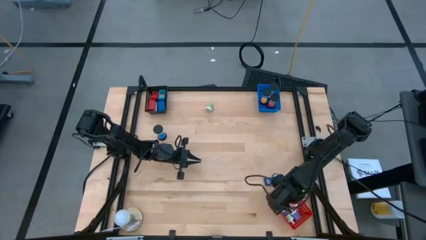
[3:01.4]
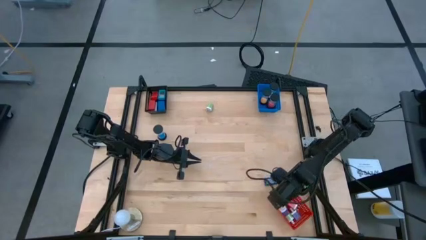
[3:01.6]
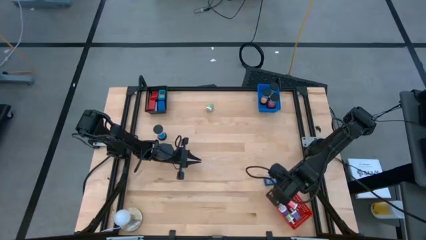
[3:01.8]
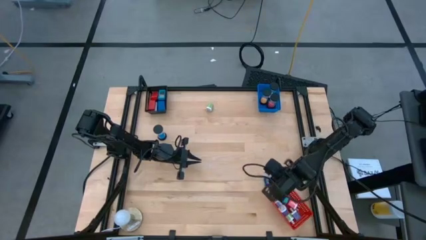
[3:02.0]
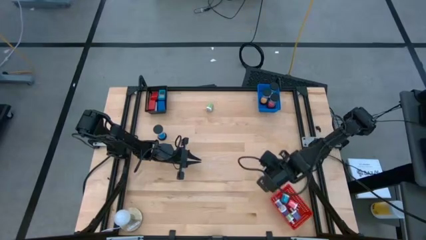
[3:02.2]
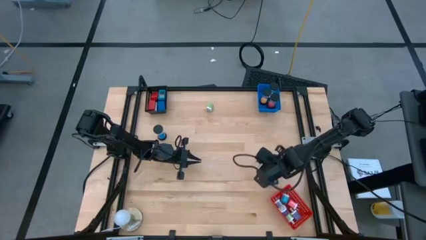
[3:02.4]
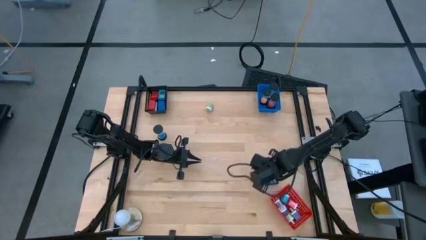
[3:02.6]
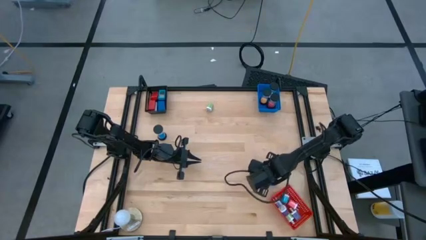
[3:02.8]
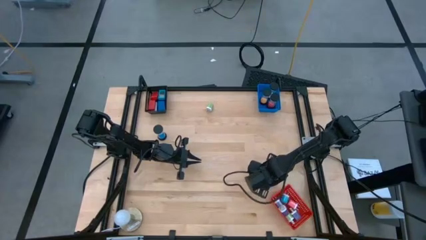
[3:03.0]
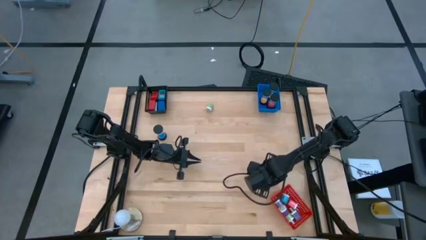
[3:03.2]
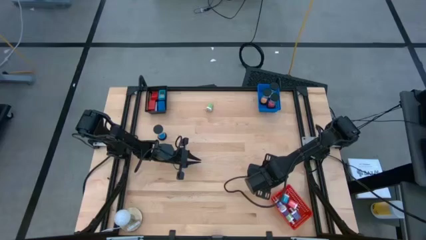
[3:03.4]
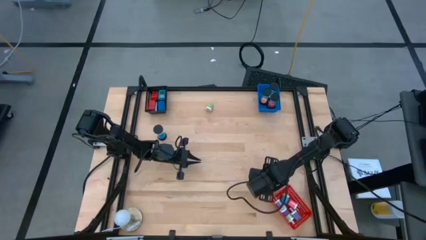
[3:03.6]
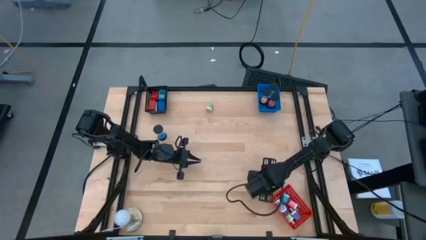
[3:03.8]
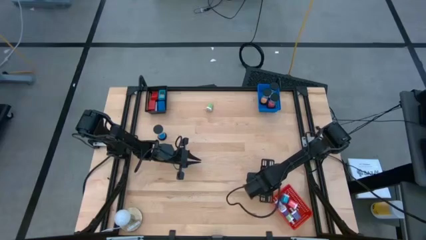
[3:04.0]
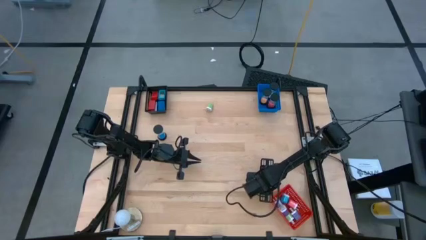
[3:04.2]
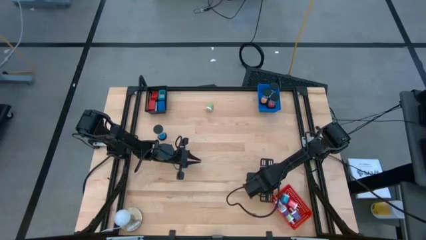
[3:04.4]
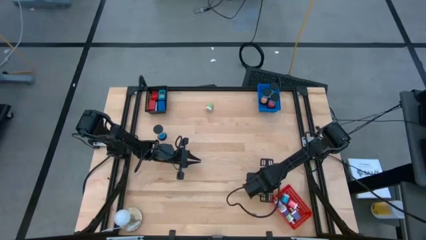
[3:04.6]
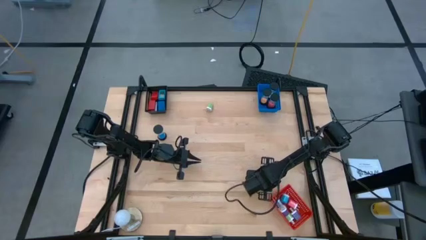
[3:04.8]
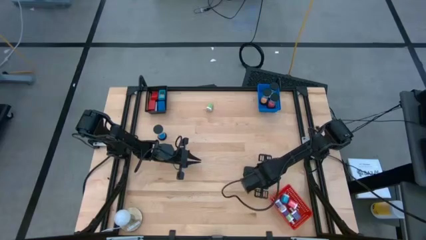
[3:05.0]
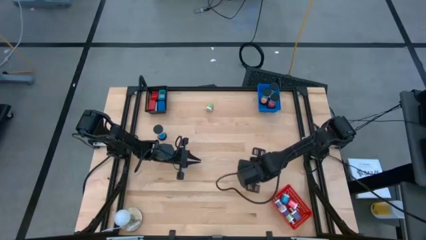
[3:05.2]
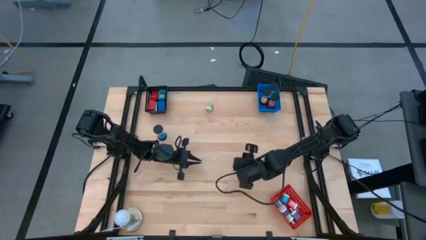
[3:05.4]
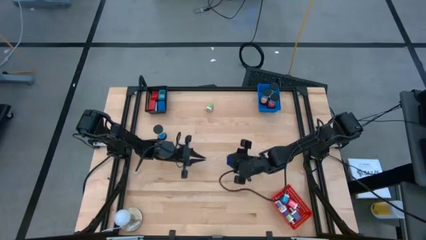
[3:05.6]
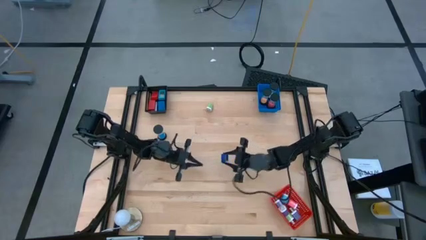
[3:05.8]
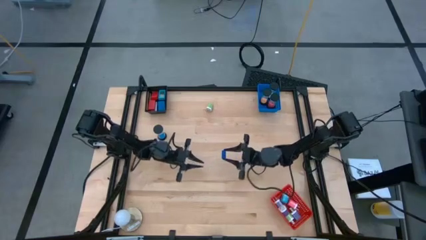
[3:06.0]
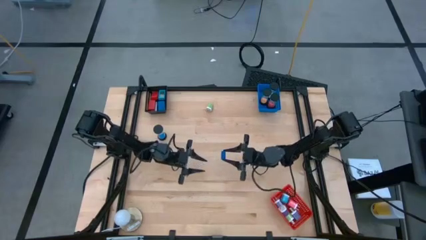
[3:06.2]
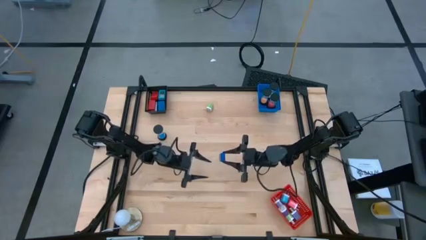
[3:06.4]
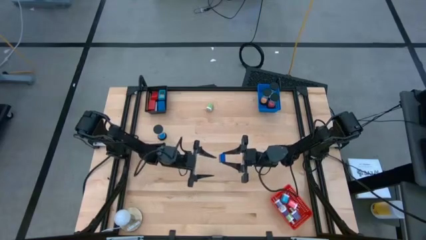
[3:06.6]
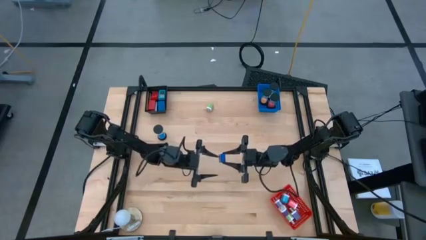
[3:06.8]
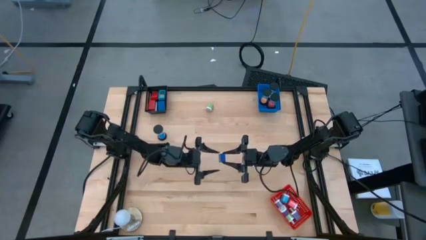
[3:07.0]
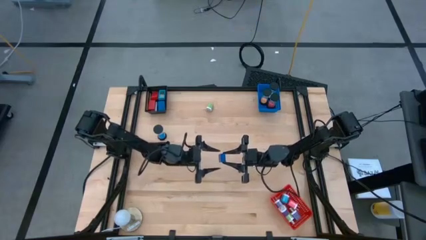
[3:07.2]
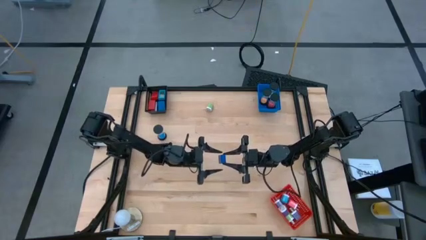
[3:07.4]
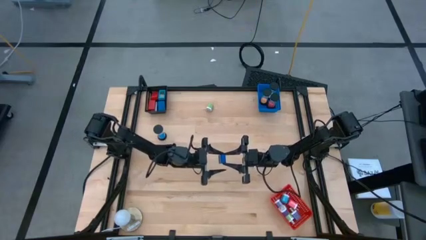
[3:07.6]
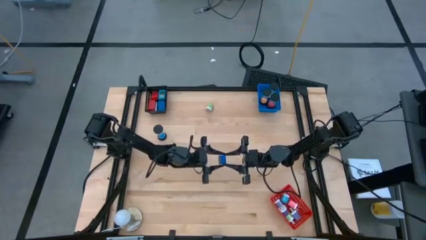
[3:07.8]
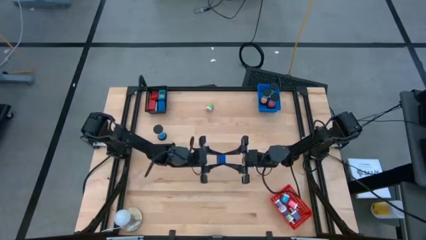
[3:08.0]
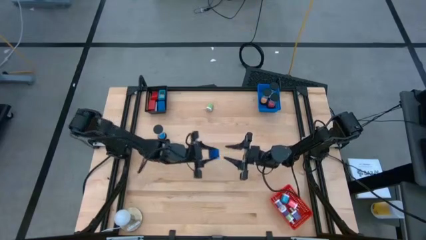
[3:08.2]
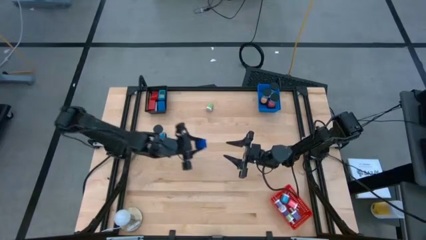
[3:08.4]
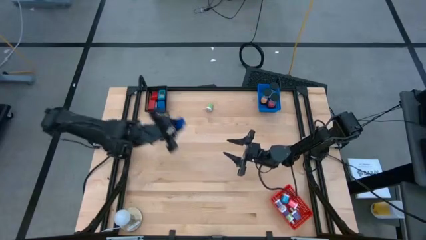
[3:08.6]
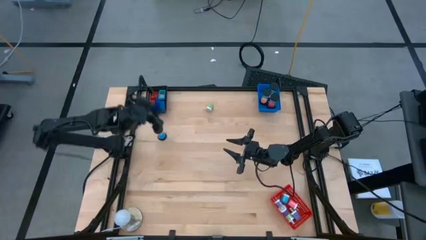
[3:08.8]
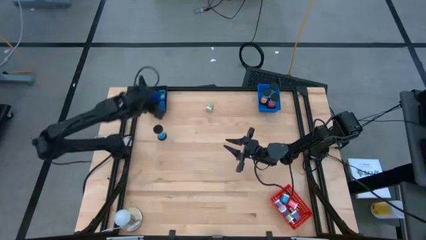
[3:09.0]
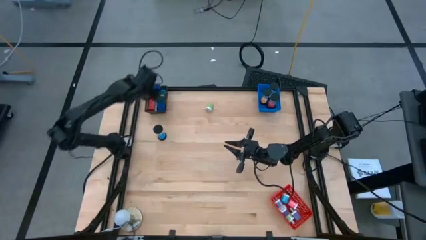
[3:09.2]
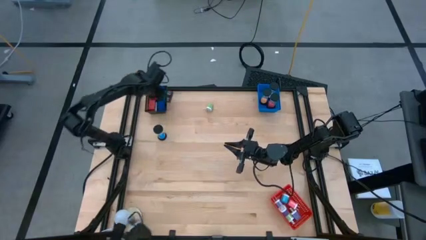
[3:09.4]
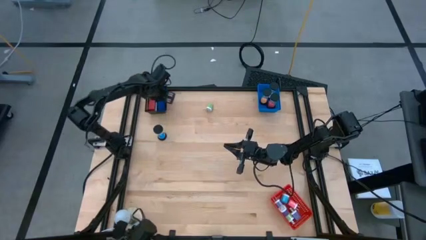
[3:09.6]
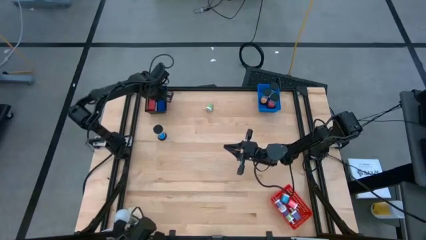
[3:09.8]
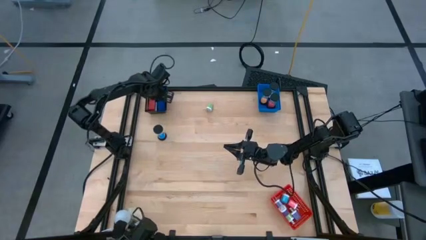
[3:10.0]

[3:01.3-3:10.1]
Task: Pick & Place Office items
Put the blue digital timer into the black basket

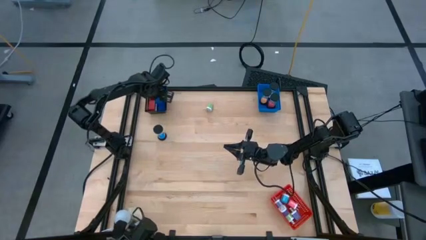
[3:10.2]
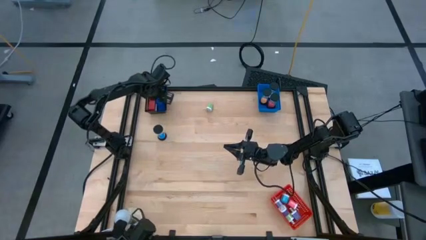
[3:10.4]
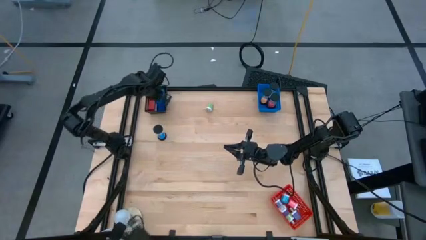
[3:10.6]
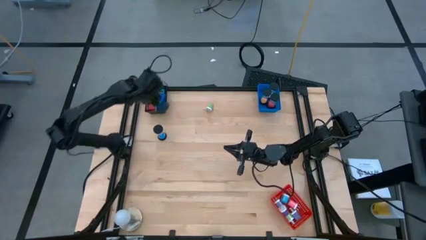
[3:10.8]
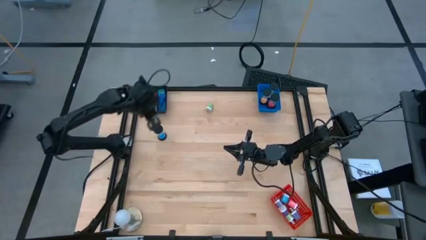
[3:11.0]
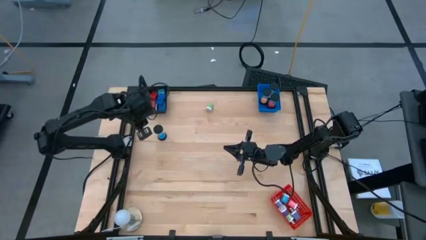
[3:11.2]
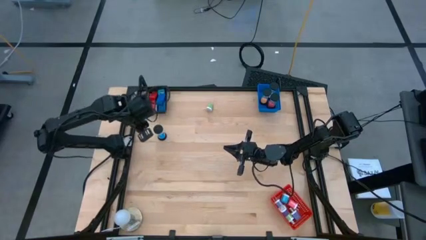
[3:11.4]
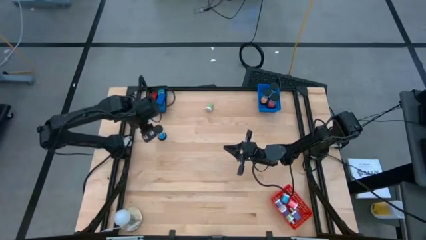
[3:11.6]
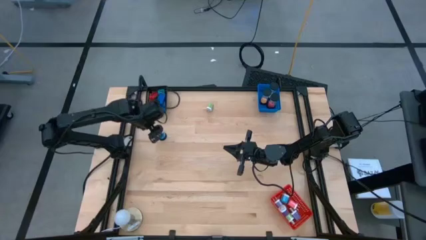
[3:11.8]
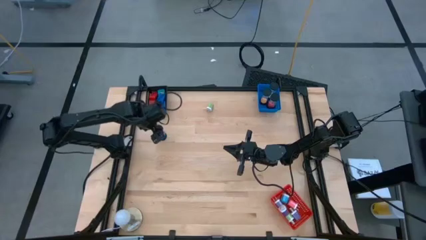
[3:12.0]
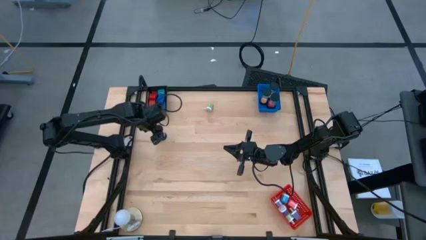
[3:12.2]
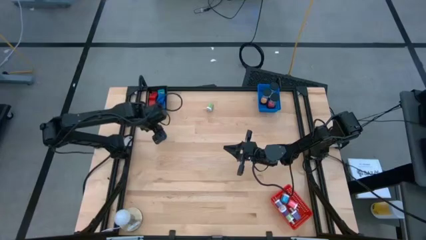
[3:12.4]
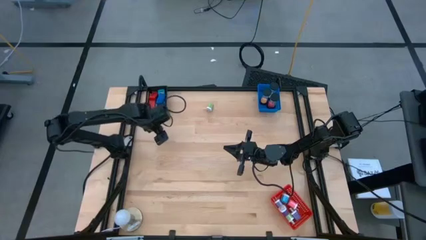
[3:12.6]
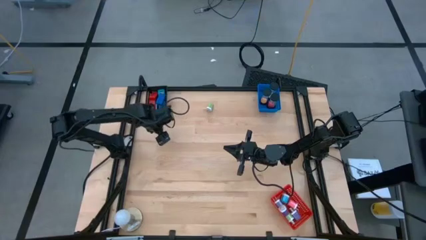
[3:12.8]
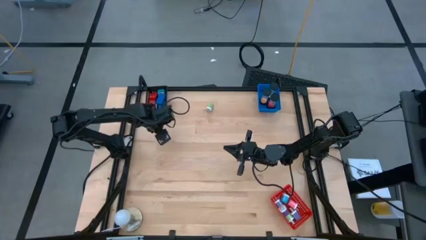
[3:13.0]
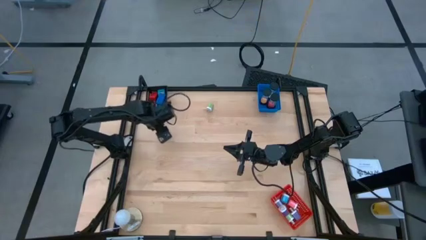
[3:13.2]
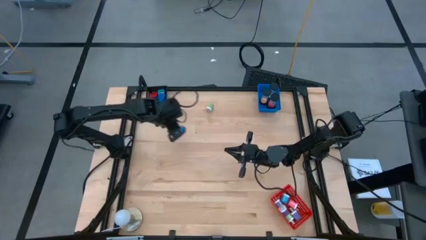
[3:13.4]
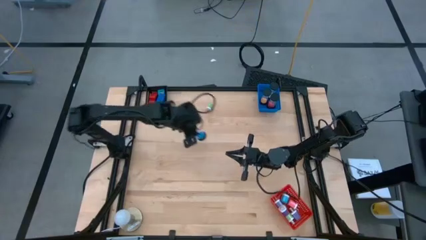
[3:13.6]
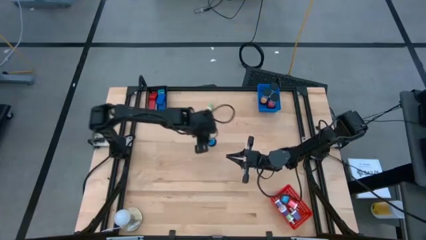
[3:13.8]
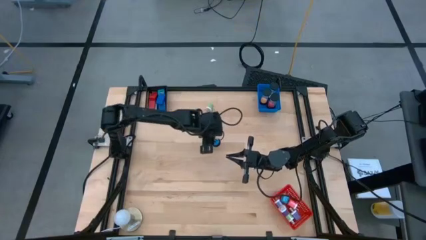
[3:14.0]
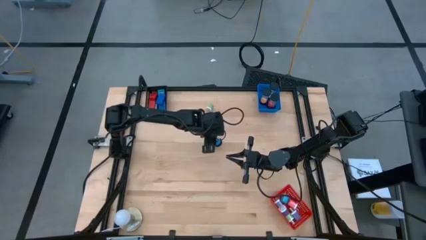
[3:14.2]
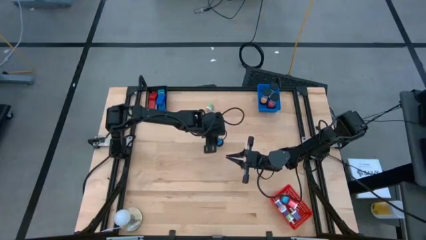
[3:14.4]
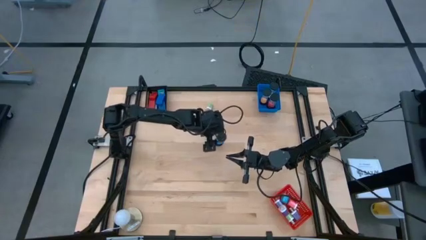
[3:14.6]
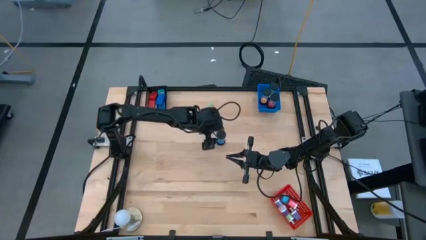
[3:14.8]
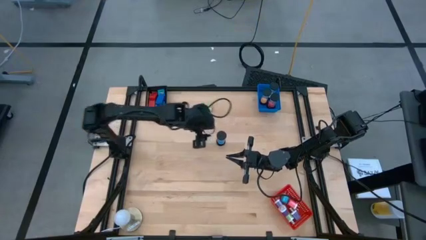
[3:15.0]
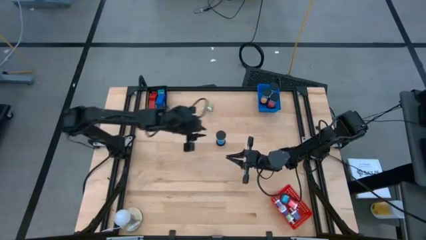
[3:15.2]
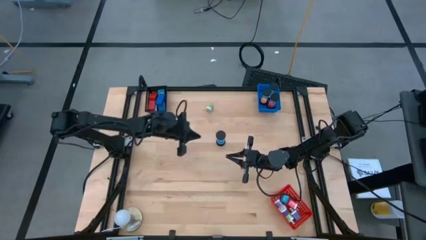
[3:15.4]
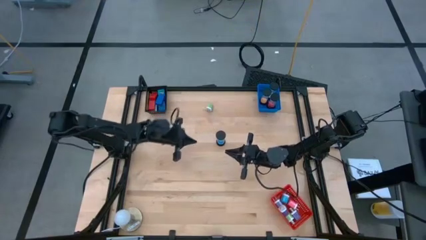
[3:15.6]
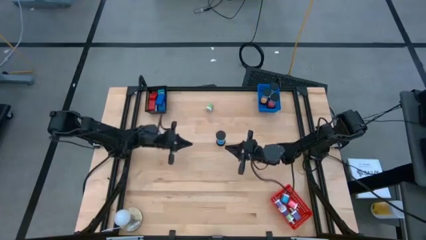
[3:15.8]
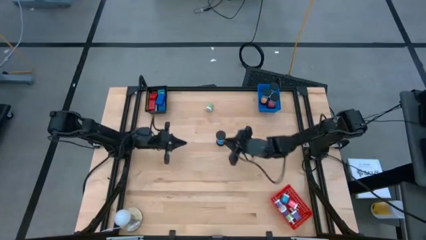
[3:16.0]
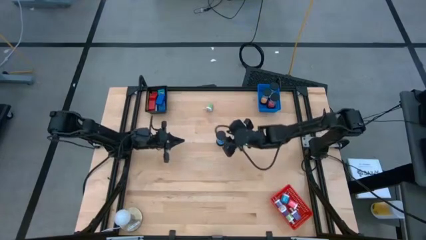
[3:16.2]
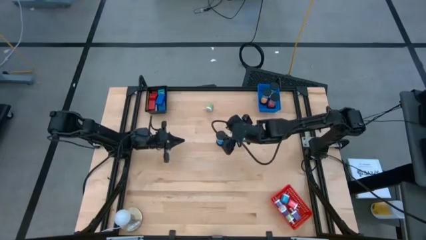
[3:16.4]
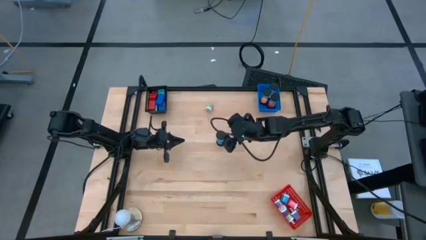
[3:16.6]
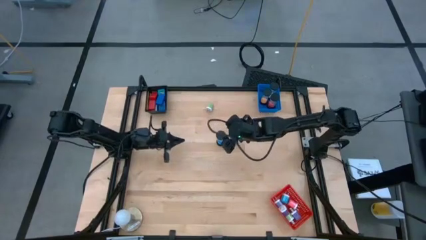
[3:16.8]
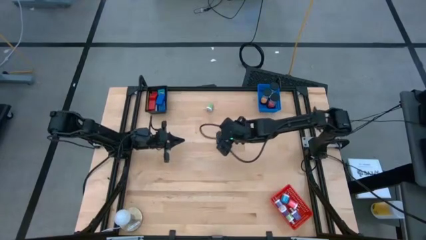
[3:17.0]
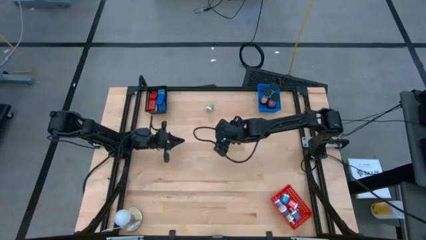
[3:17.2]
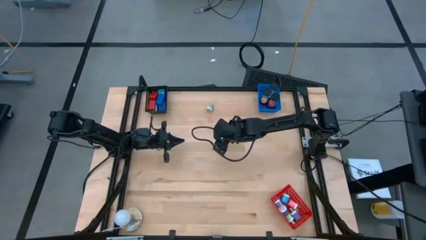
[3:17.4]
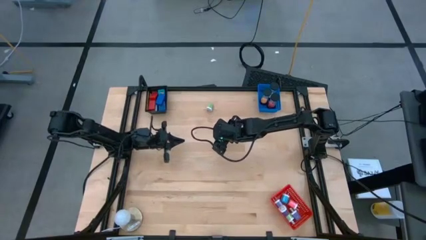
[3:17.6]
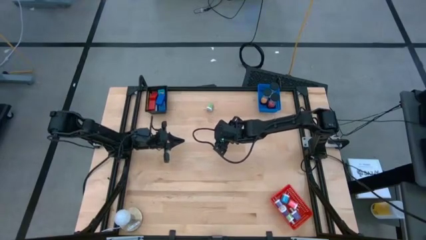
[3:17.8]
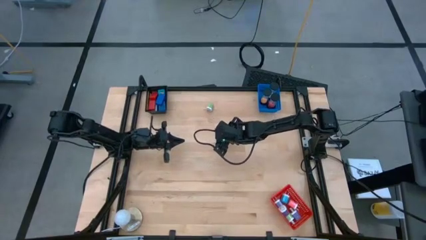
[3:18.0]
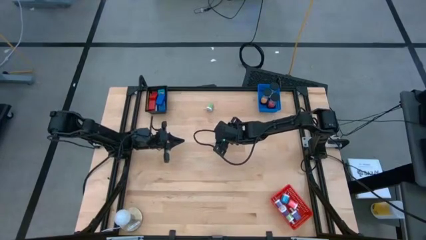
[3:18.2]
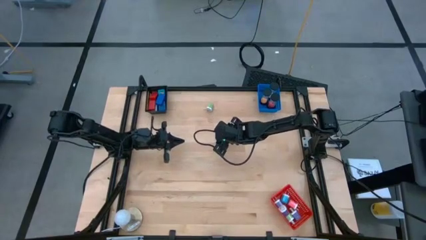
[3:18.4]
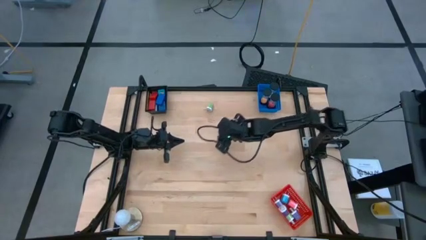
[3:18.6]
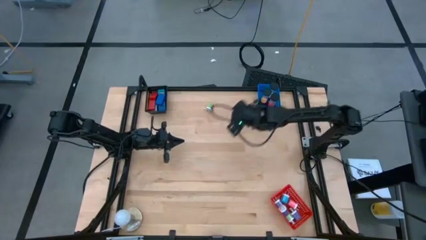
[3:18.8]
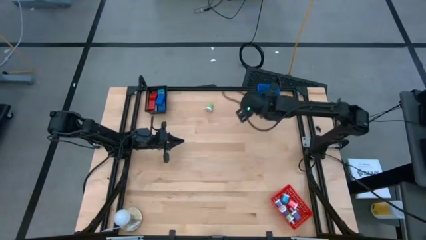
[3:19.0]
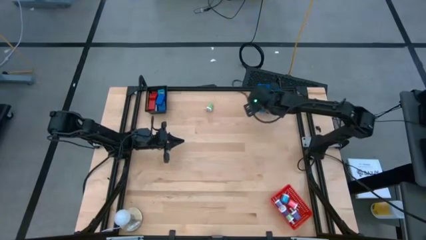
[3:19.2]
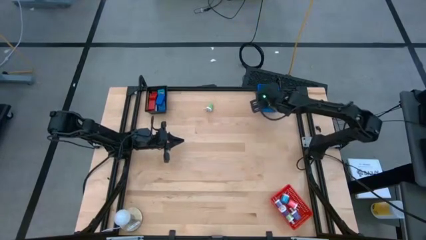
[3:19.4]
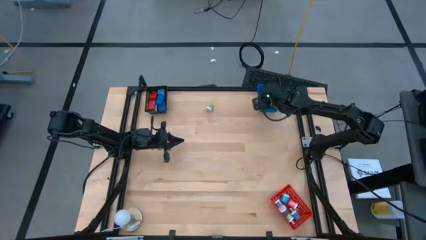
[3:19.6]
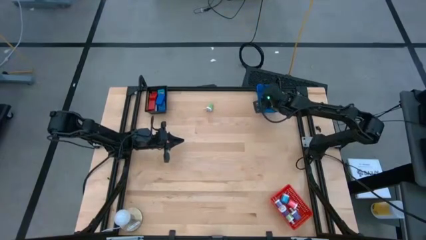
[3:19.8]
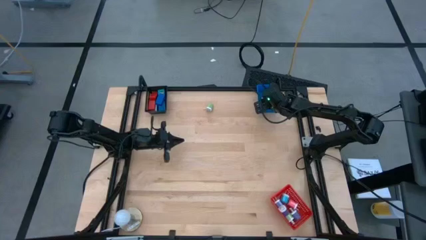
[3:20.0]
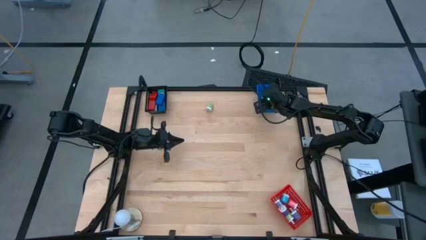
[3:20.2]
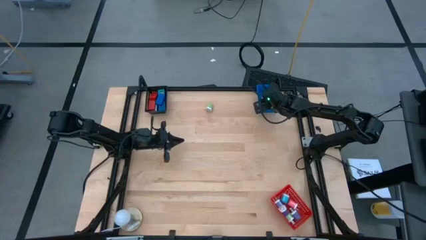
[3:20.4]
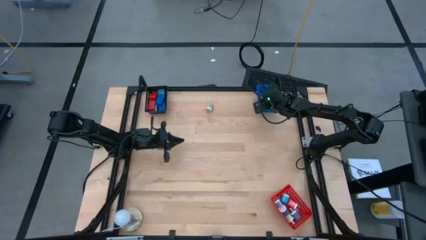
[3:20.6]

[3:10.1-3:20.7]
Put the blue sand timer into the blue basket
